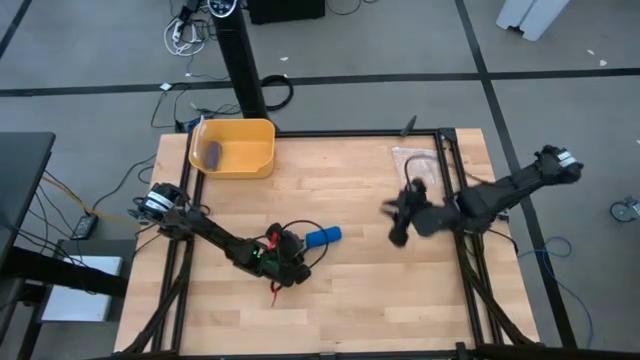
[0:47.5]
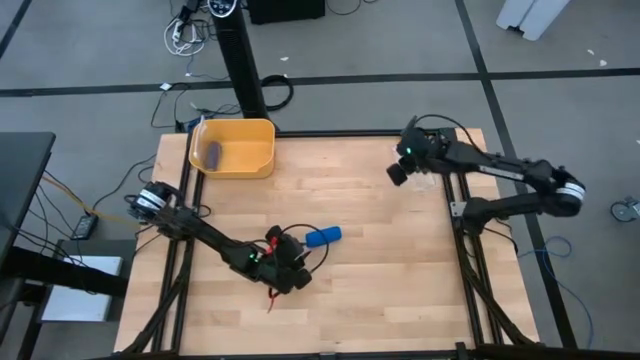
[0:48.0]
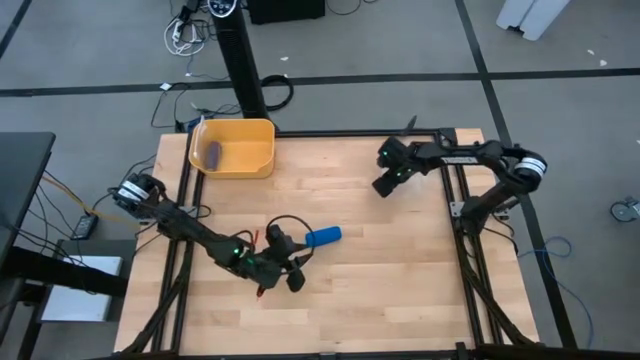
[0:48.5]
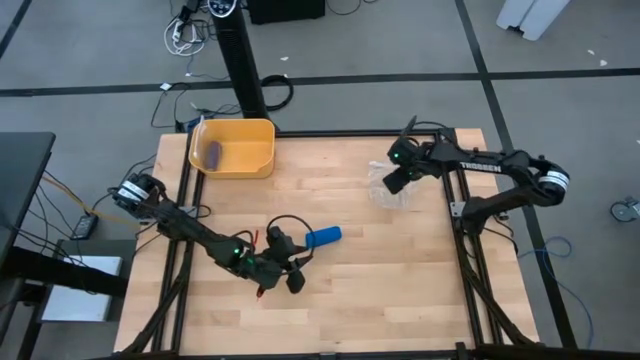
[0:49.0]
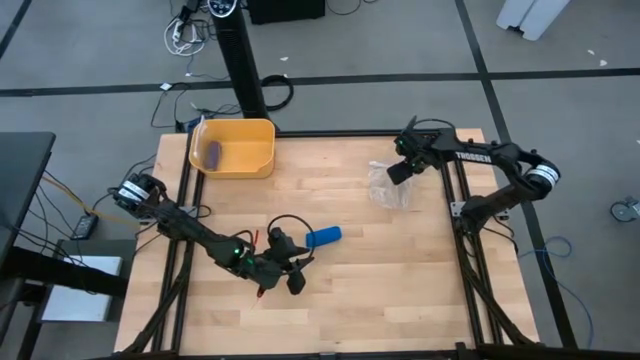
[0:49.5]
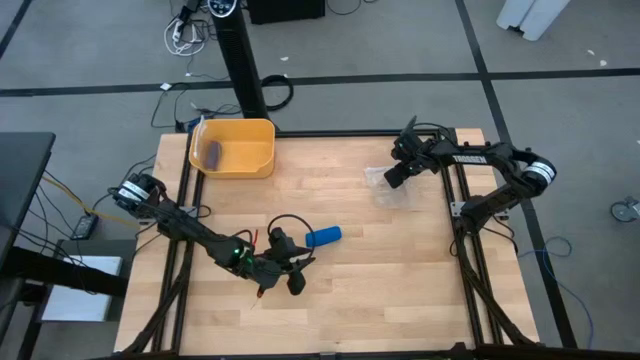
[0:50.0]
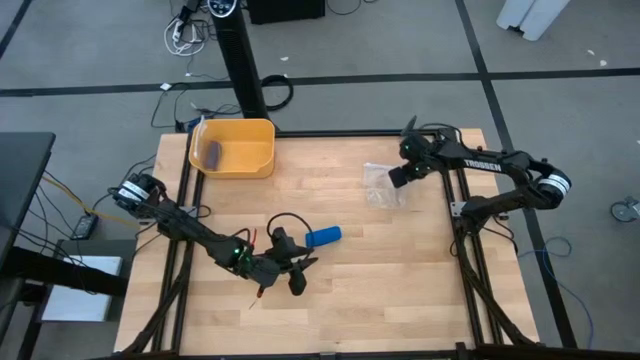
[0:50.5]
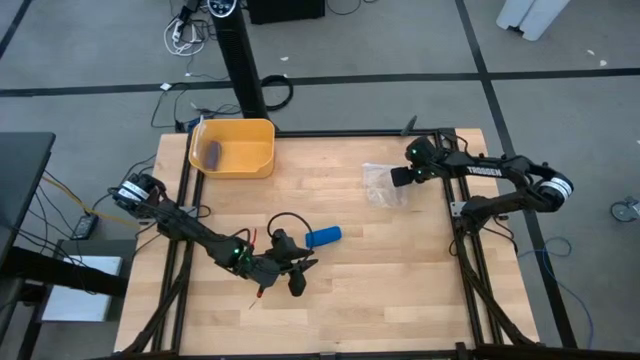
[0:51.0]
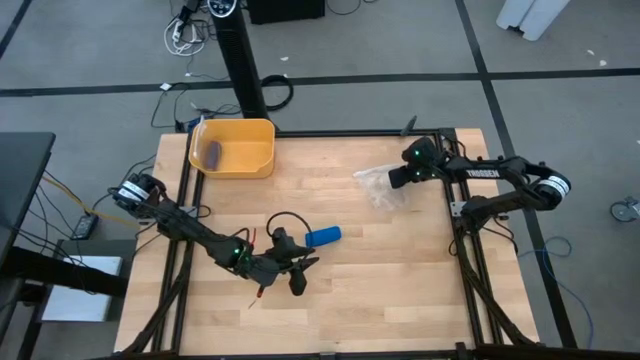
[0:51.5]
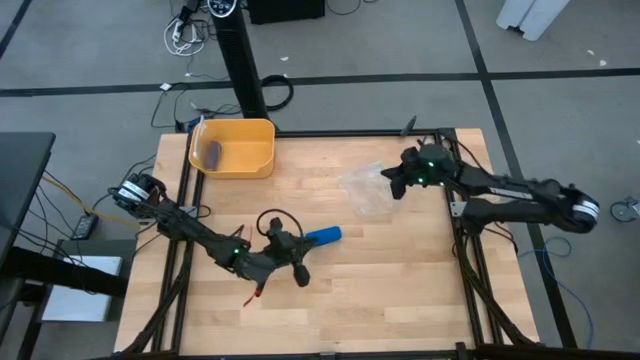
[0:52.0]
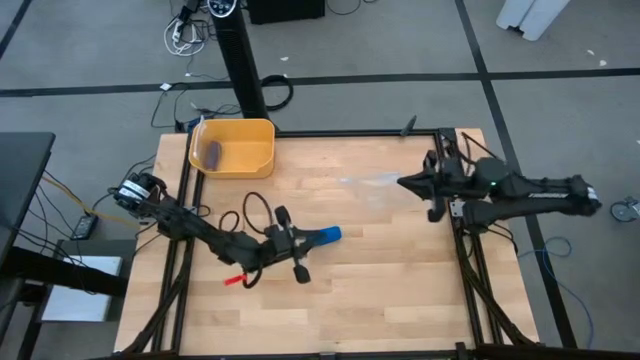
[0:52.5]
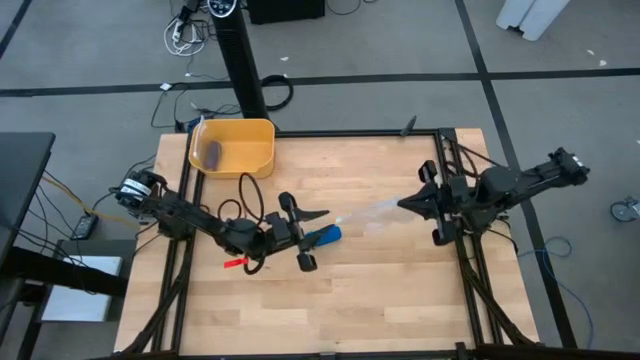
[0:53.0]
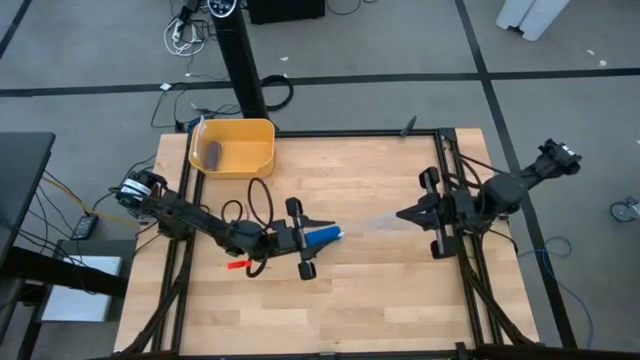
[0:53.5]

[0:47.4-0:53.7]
Task: Roll bandage
Open the transparent zip bag

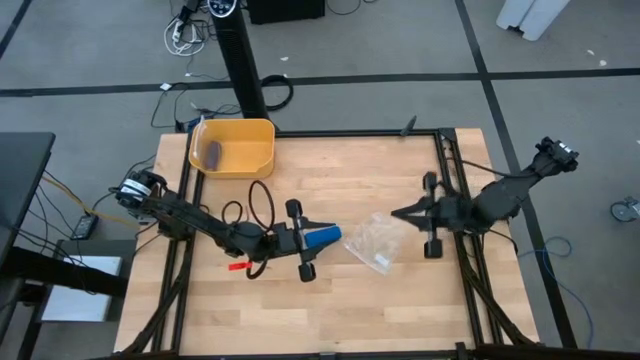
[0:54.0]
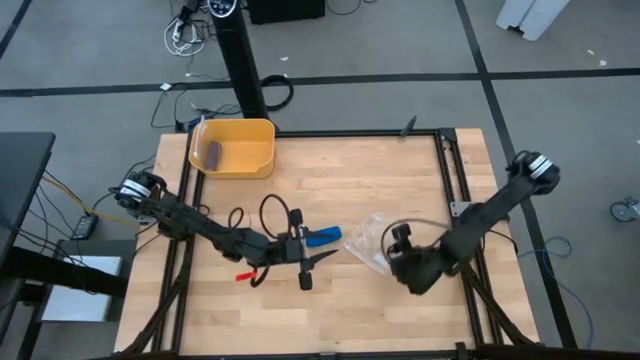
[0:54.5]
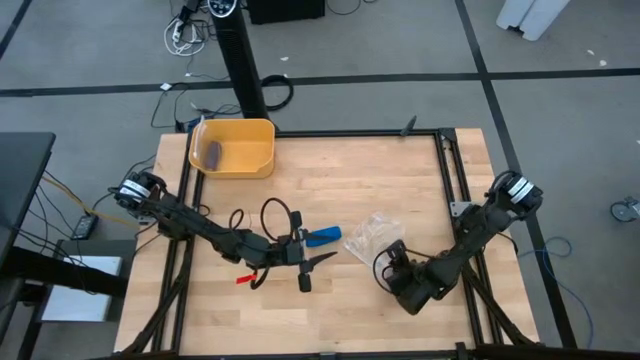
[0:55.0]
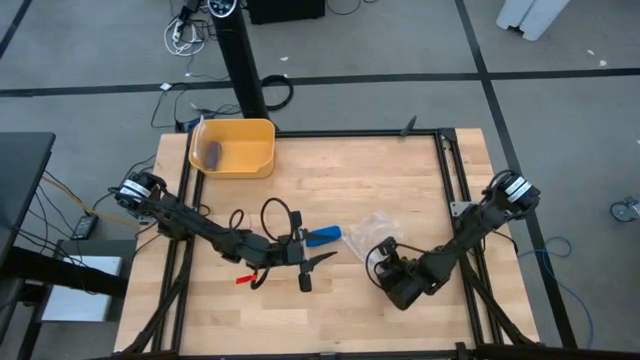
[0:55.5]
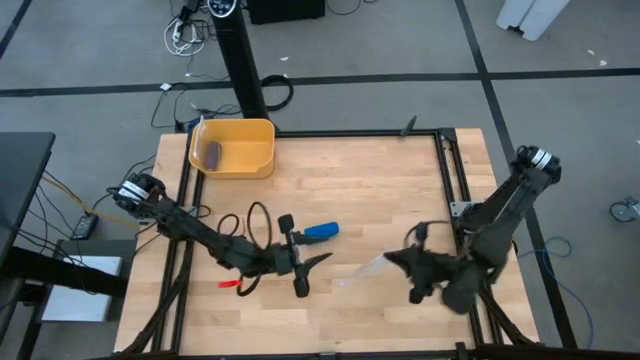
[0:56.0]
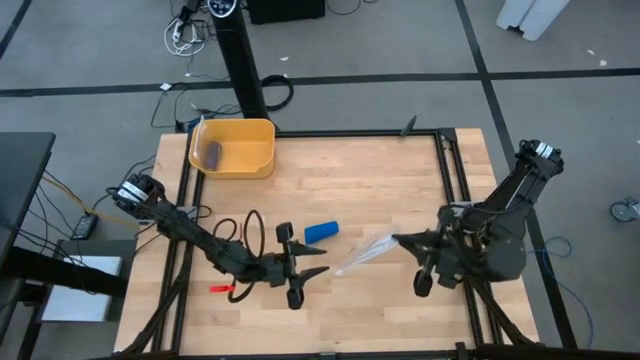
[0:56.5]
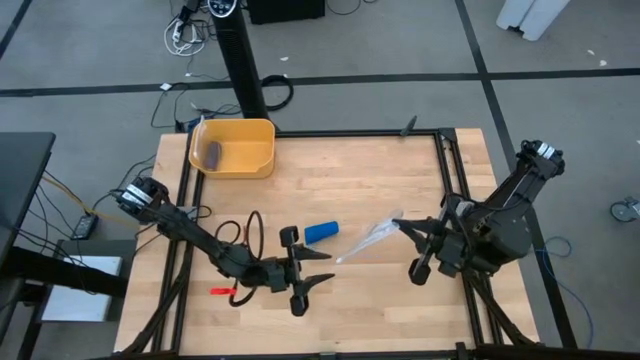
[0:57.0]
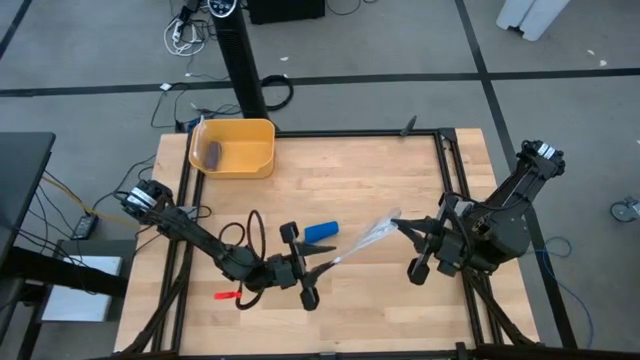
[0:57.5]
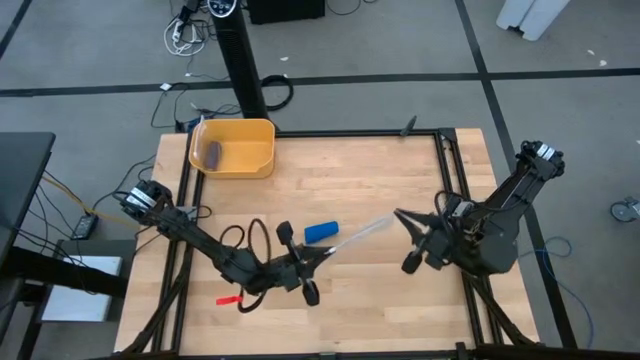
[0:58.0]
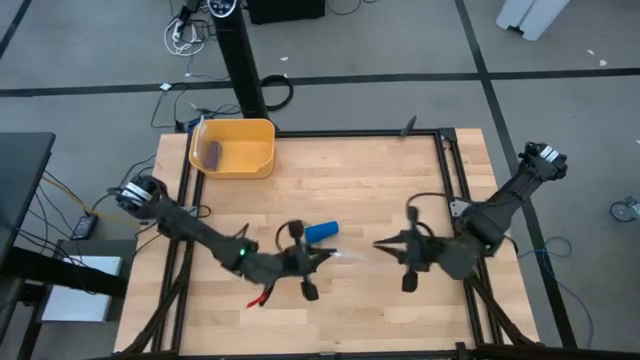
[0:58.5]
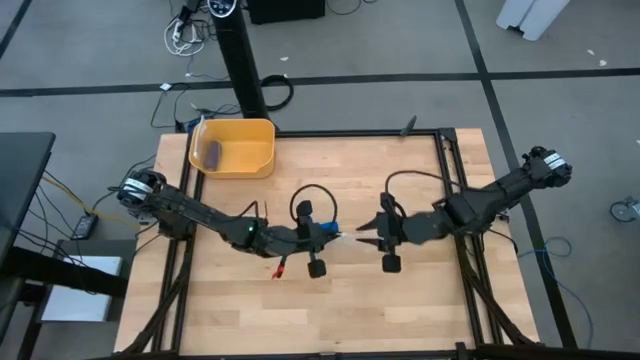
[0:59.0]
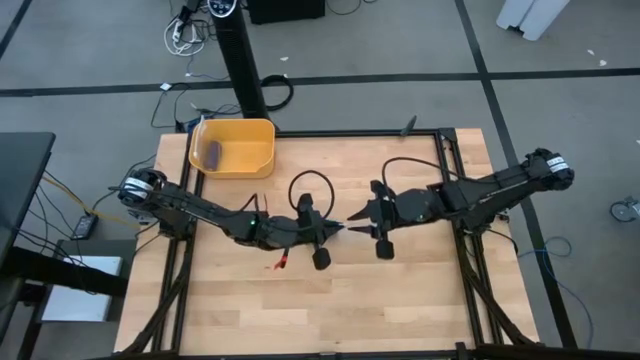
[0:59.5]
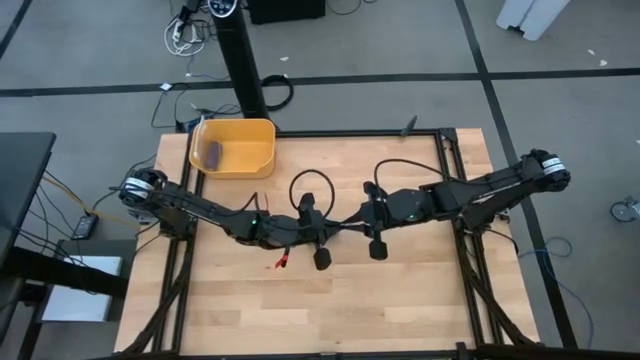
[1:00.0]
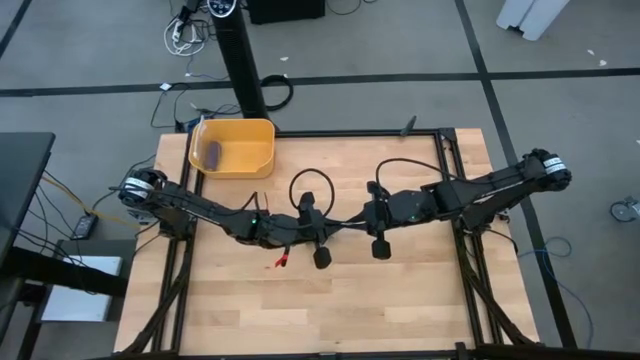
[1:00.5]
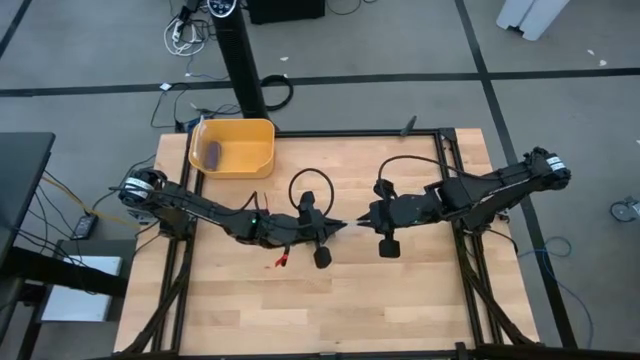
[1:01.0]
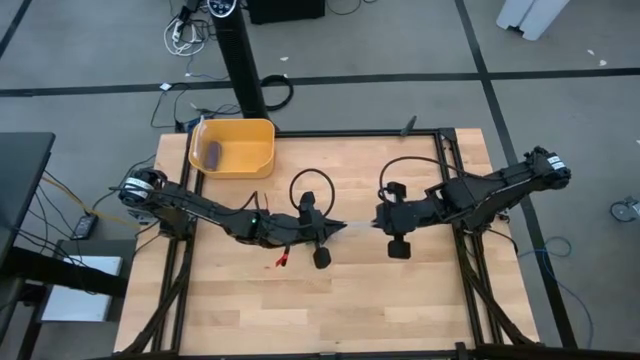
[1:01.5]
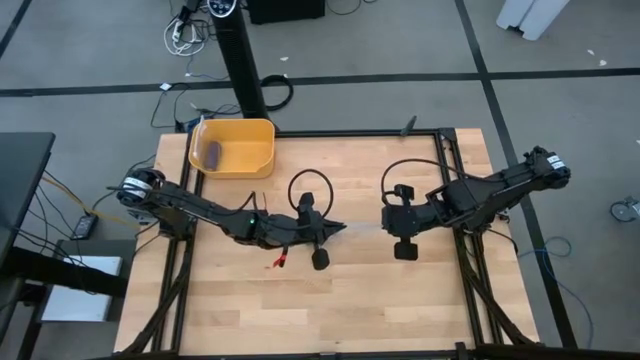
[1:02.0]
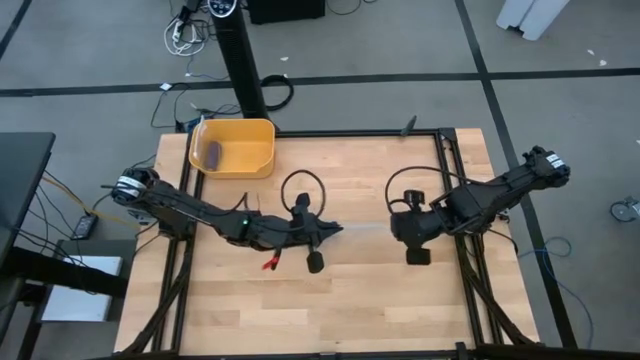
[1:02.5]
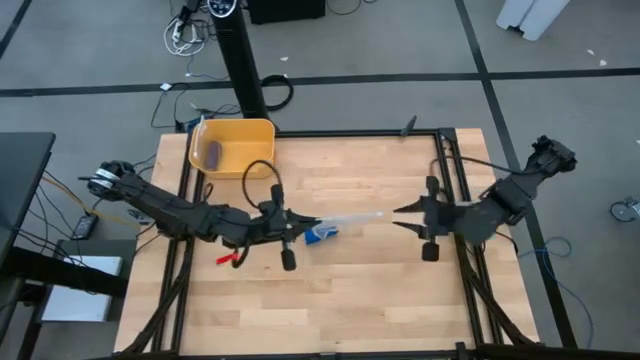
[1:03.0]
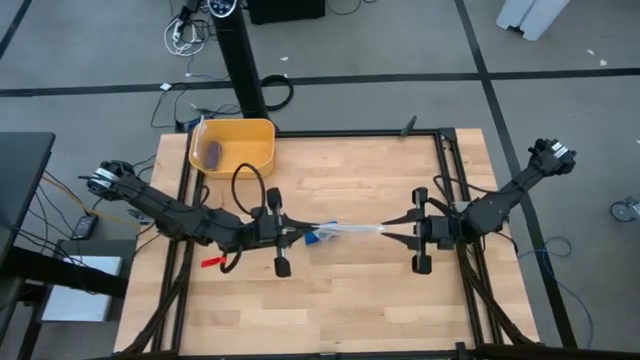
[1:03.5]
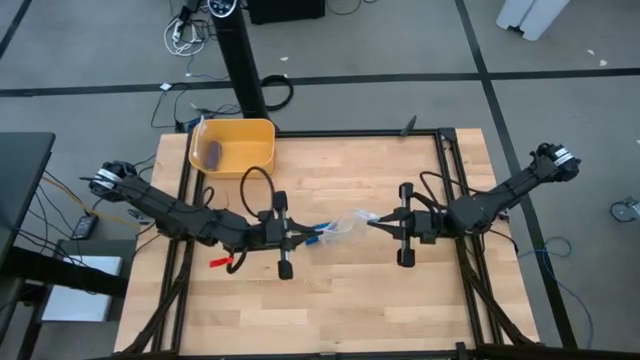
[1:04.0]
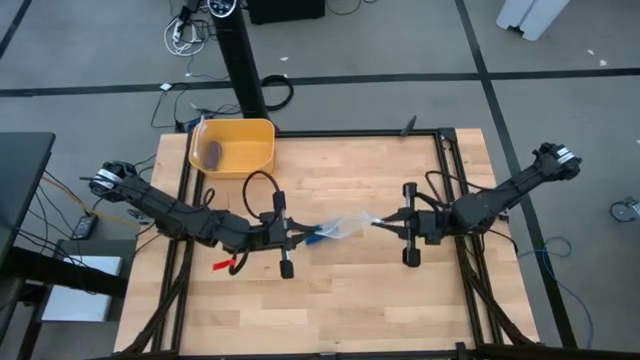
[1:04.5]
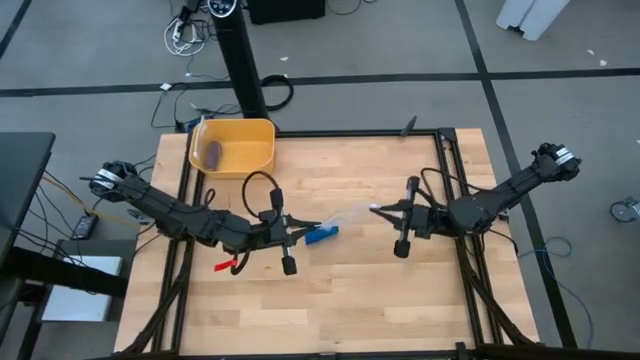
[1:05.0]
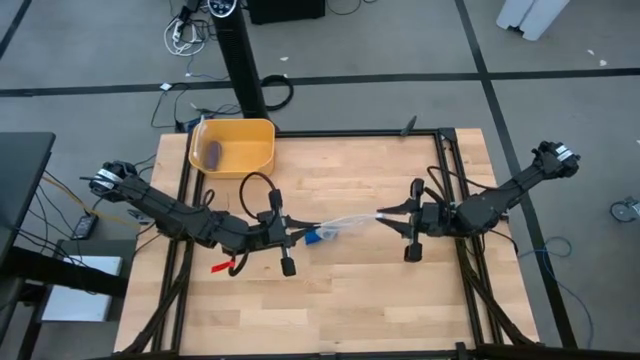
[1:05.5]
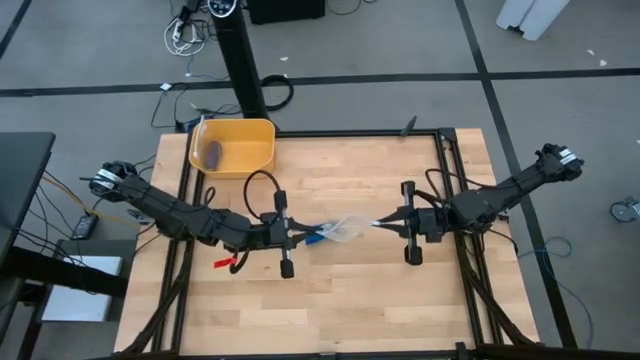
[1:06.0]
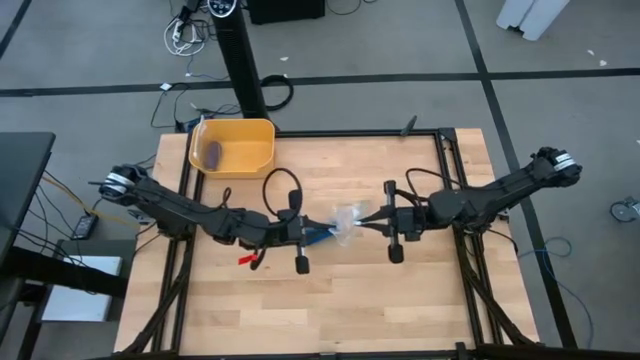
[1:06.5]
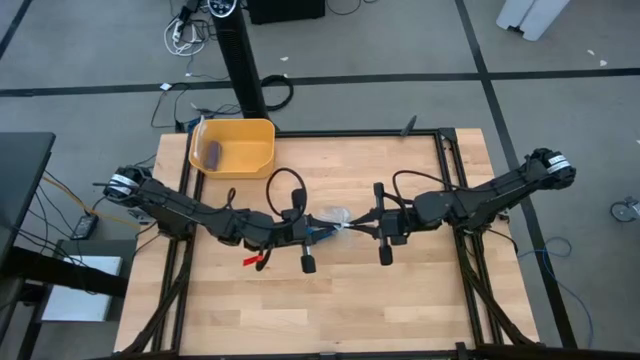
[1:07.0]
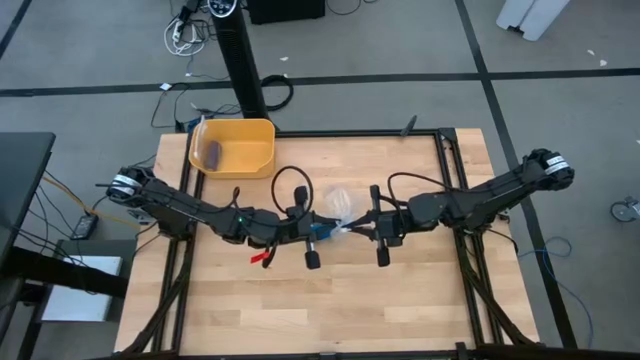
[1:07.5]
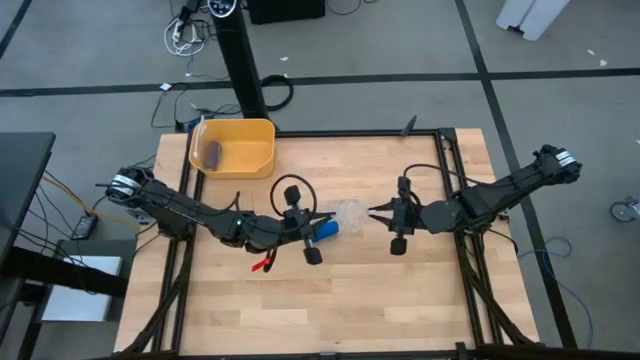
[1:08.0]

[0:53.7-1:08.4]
Open the transparent zip bag
